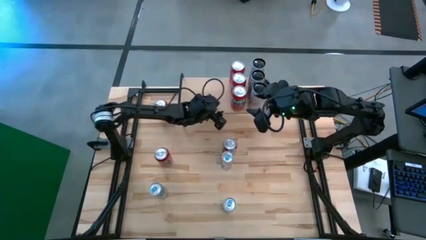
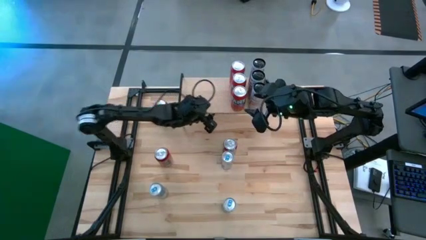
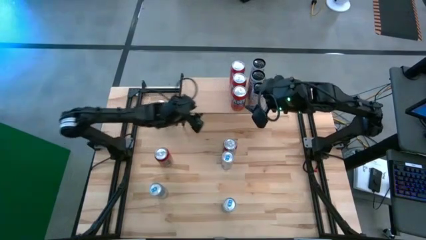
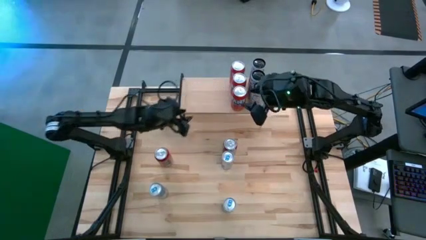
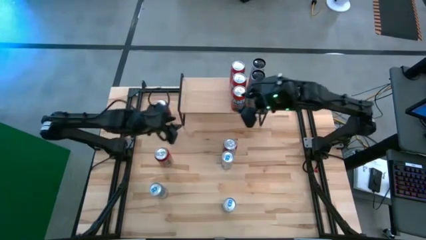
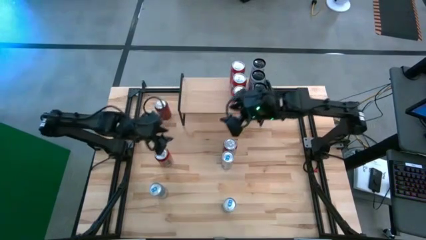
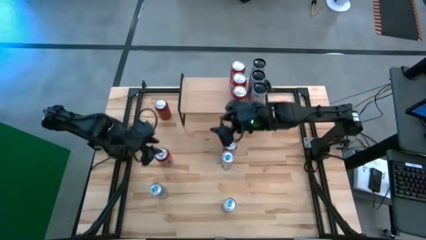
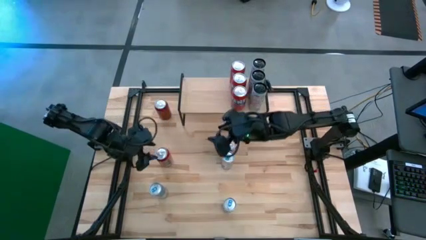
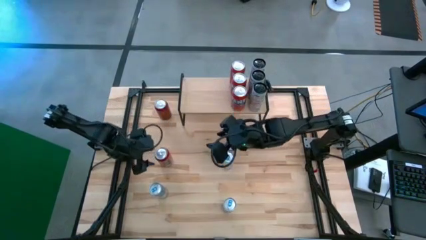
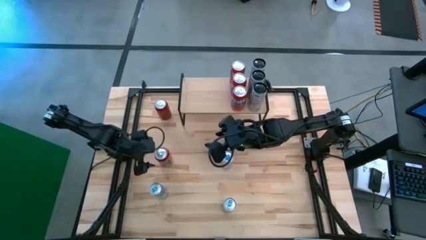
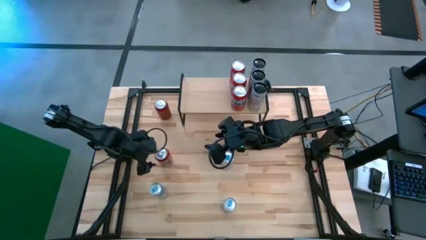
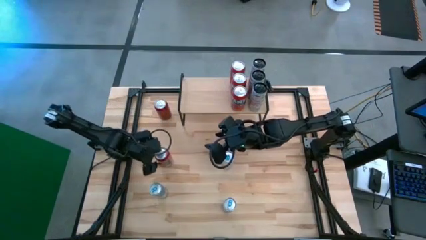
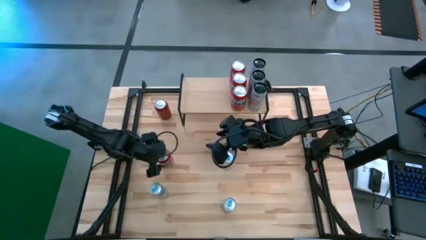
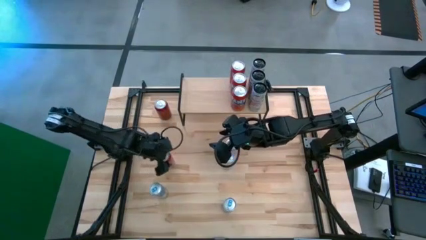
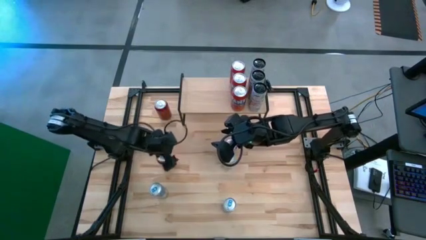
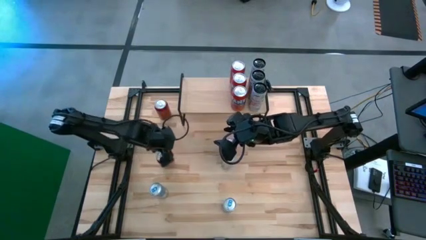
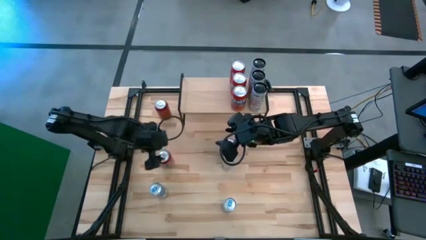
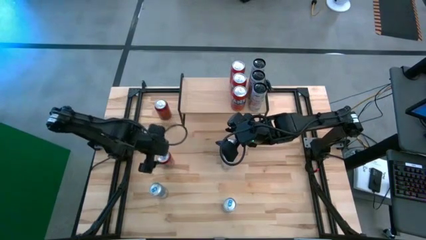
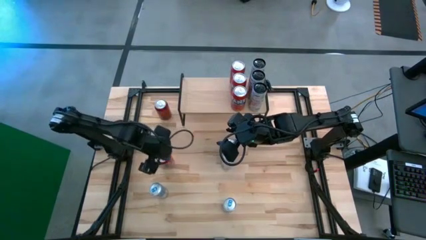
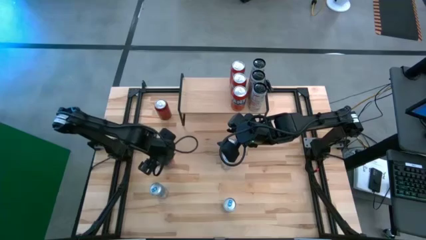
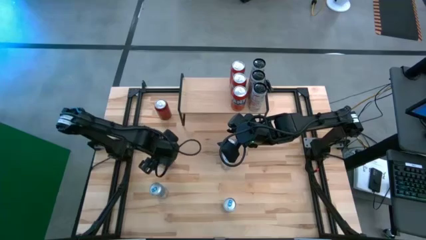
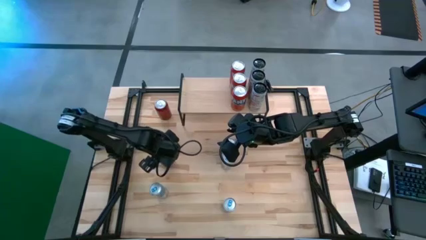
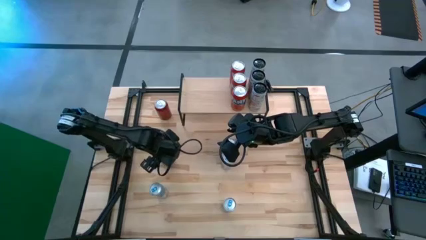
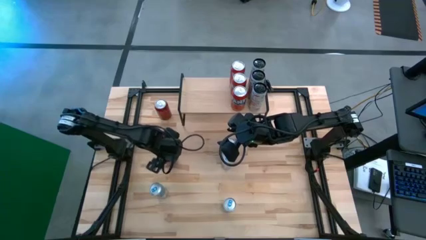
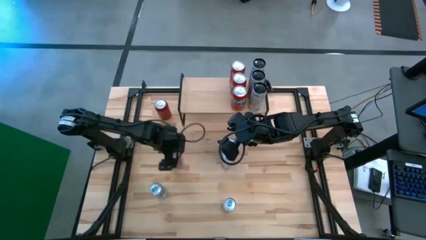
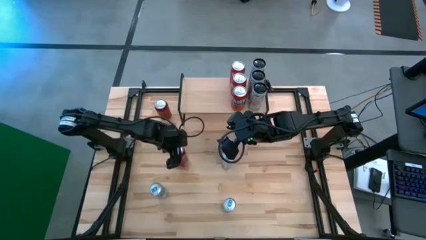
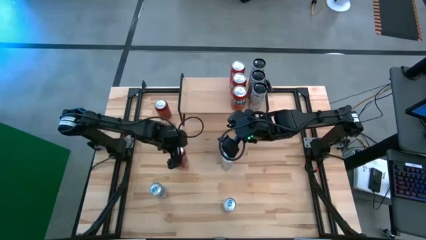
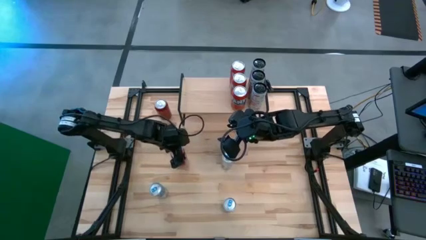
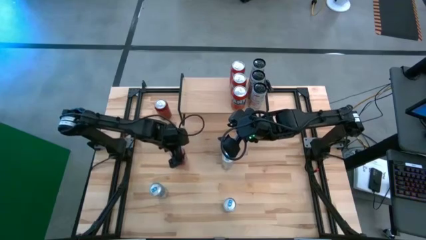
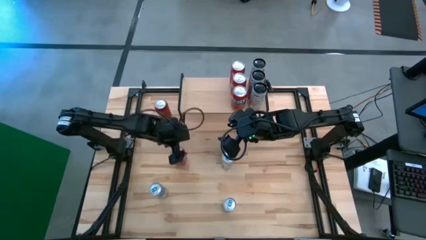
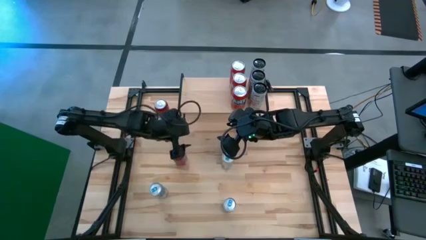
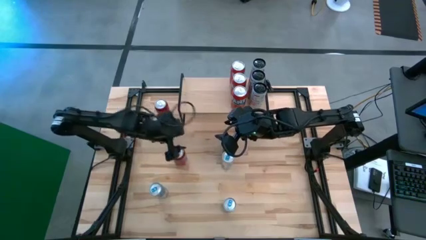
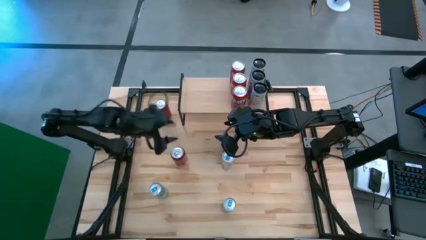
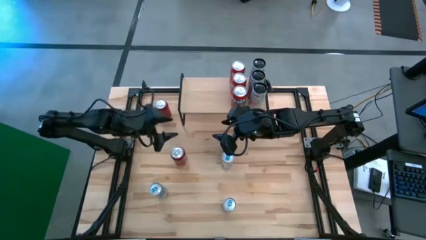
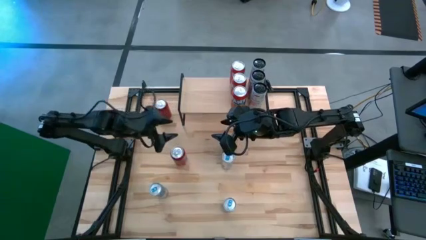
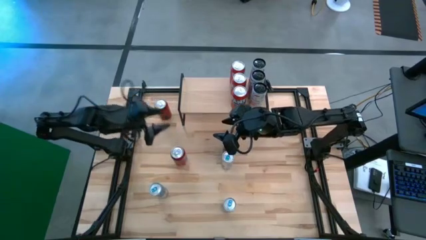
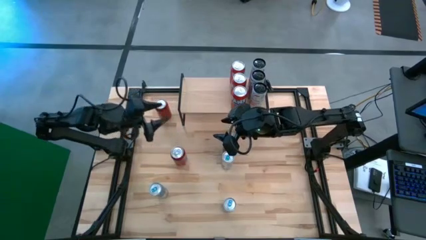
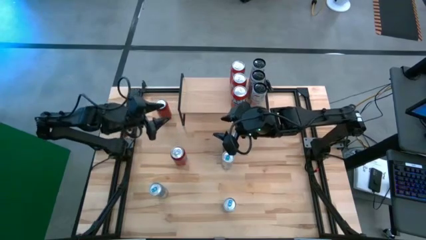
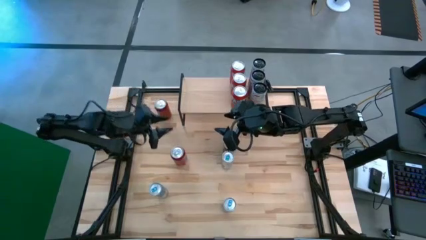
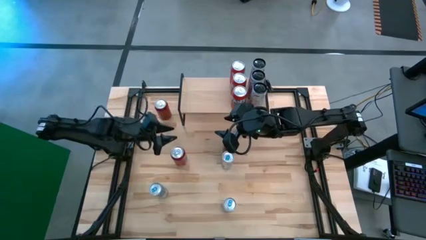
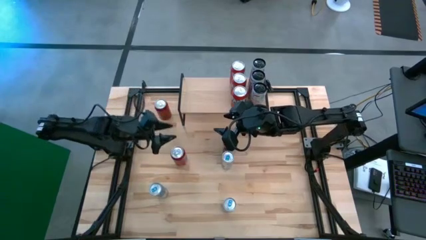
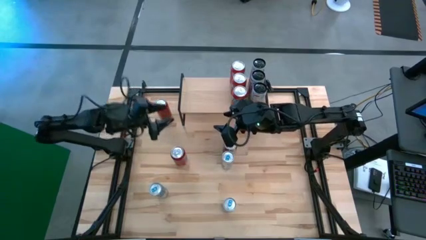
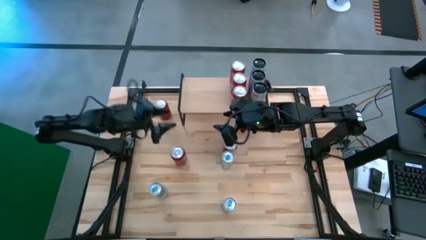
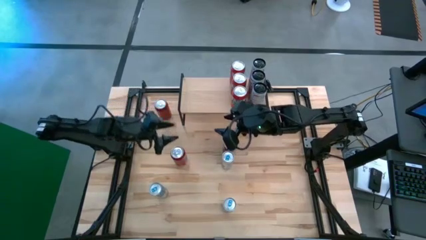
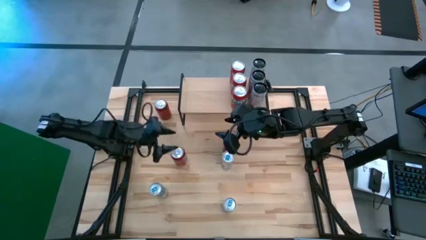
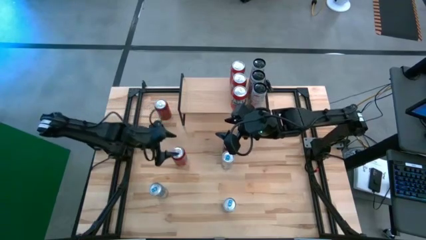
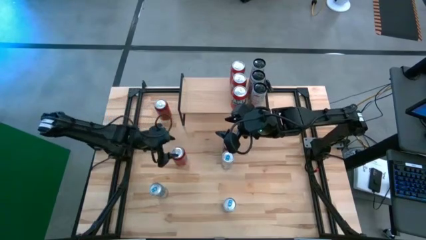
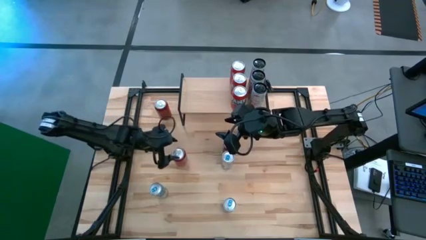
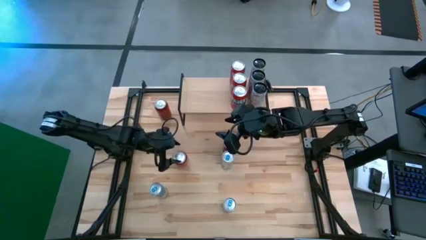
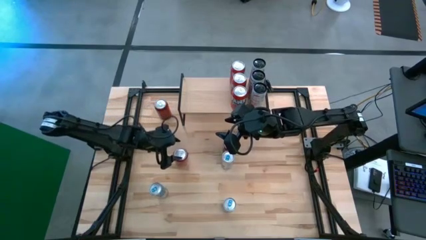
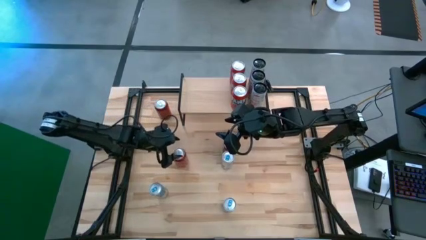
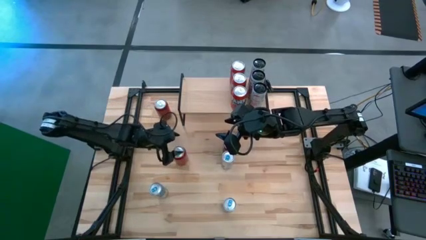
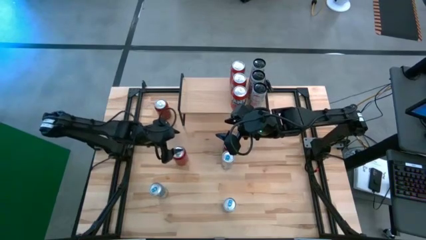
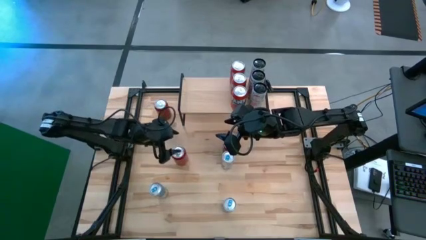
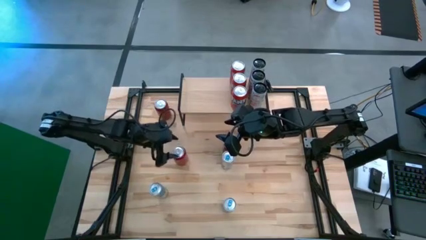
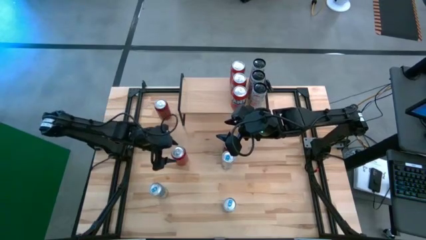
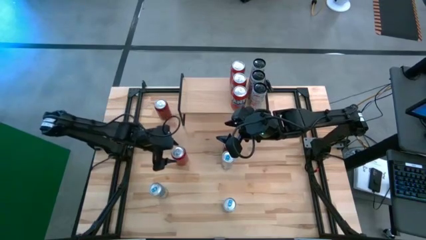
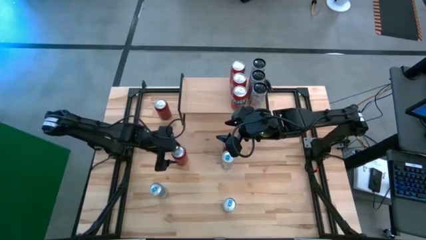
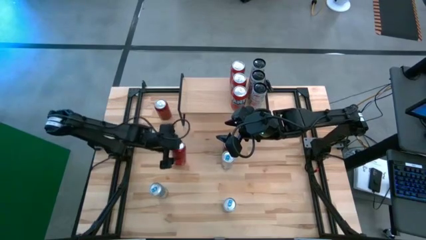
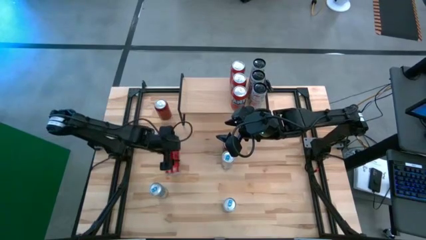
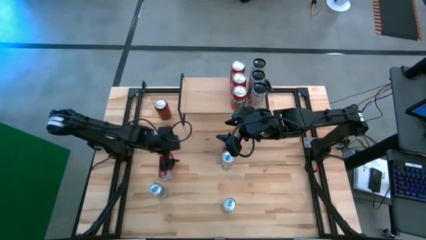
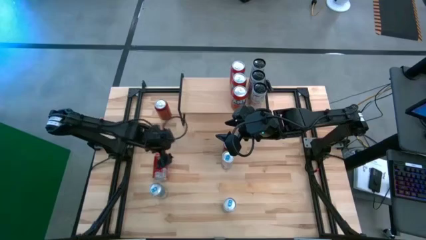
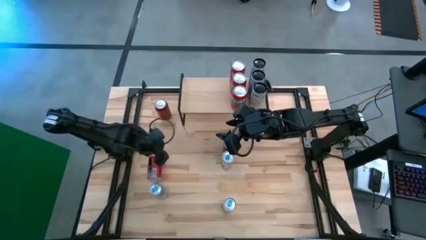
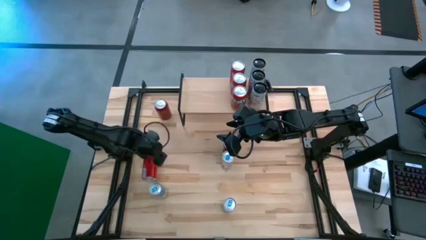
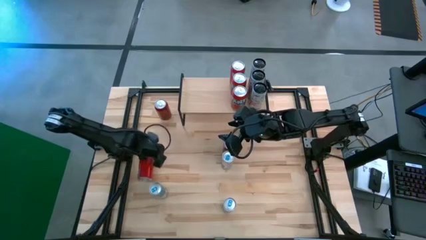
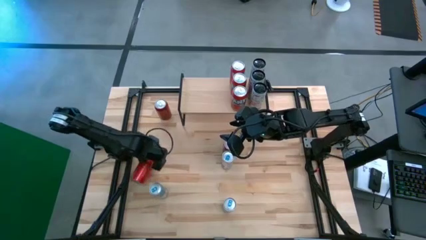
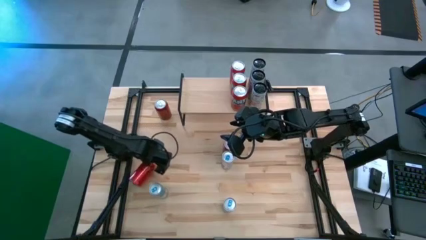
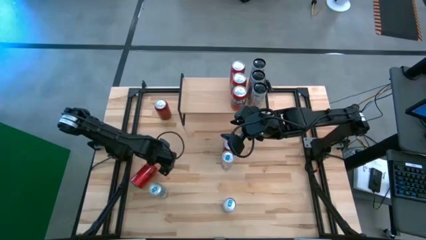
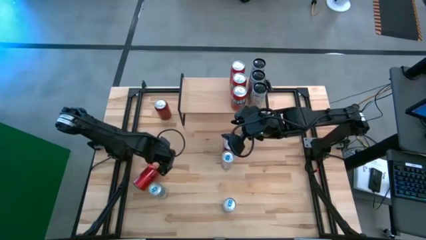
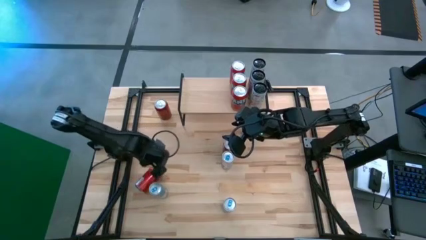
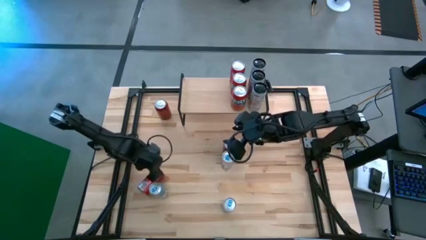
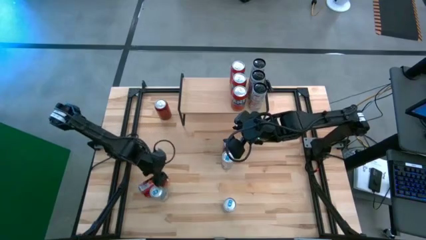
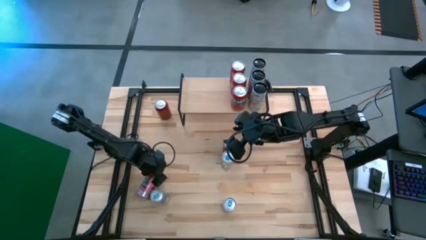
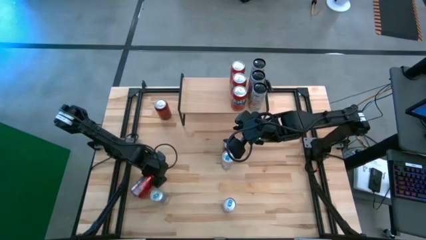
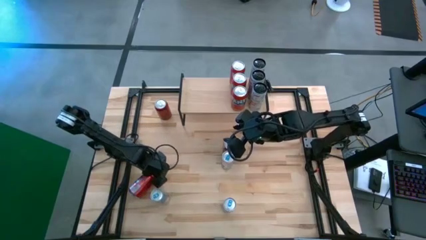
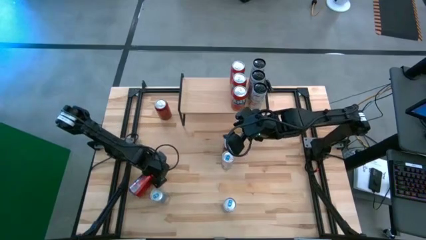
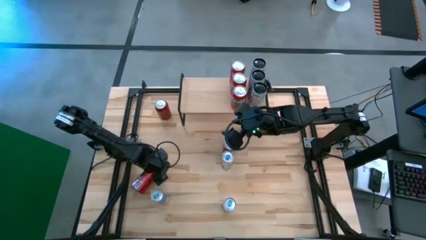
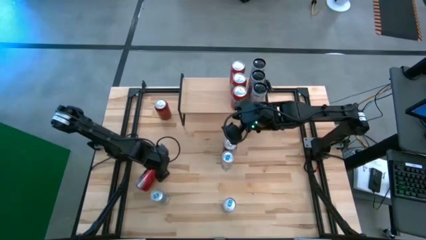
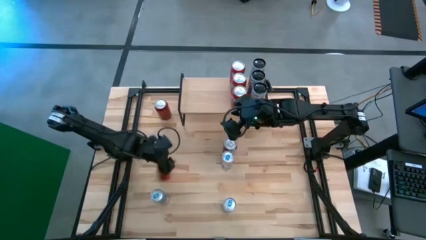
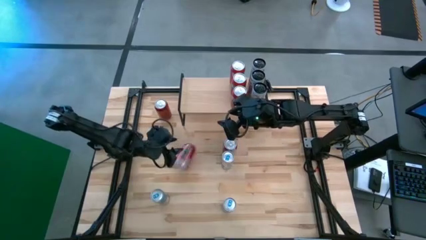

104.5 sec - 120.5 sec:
Task: Place canned beverage on shelf
Put the bottom red black soda can on the shelf
